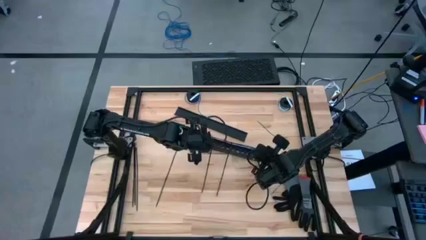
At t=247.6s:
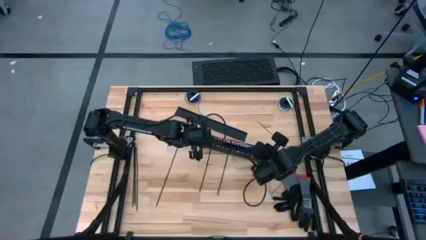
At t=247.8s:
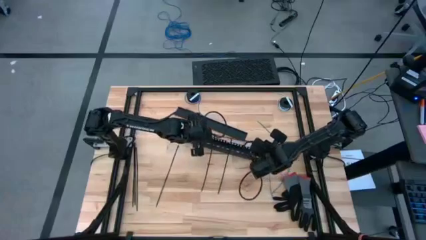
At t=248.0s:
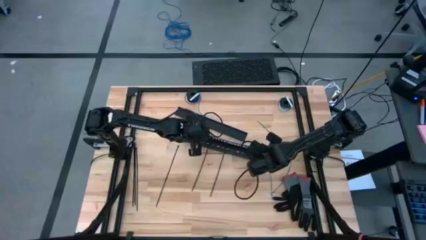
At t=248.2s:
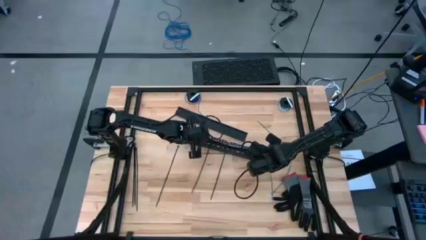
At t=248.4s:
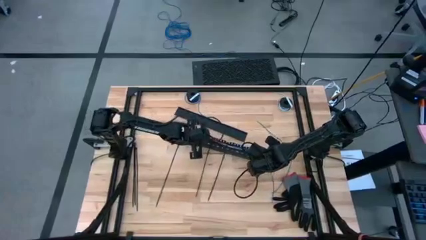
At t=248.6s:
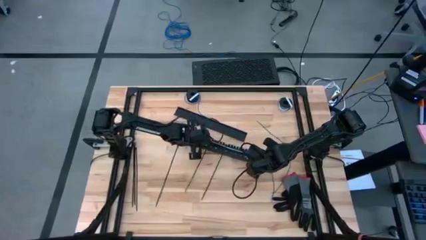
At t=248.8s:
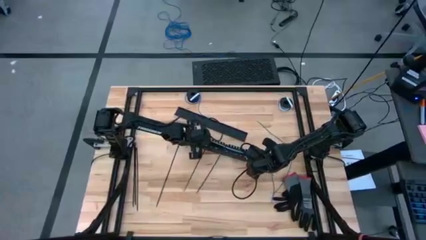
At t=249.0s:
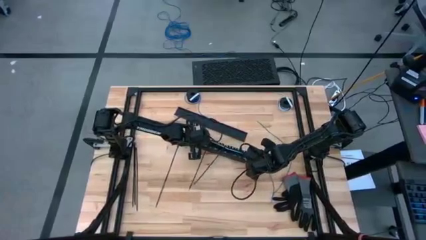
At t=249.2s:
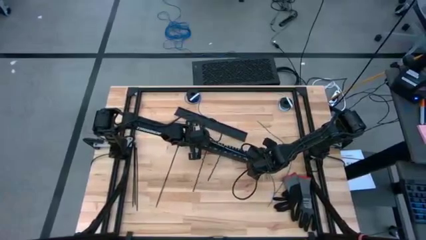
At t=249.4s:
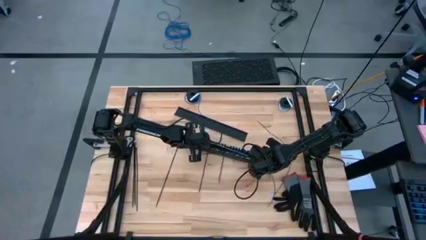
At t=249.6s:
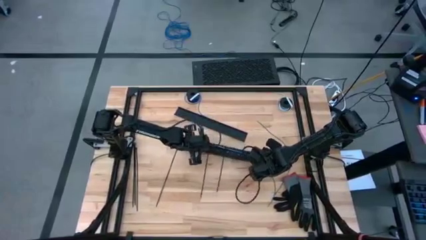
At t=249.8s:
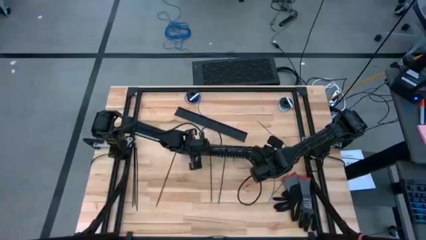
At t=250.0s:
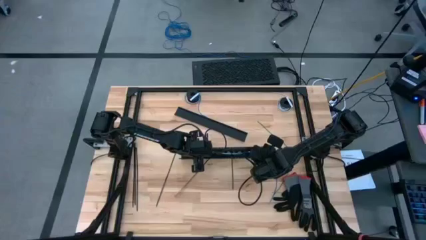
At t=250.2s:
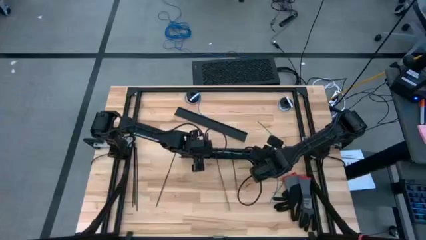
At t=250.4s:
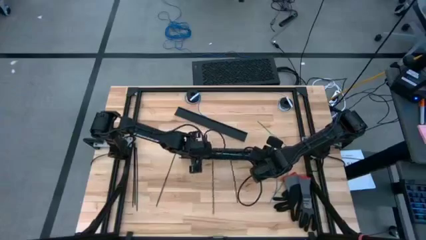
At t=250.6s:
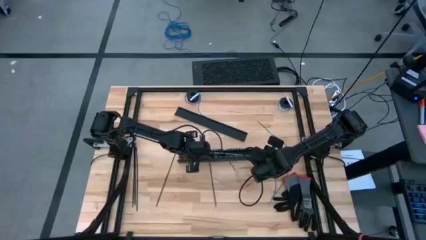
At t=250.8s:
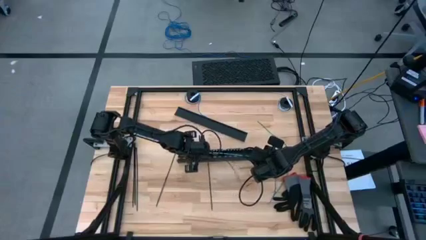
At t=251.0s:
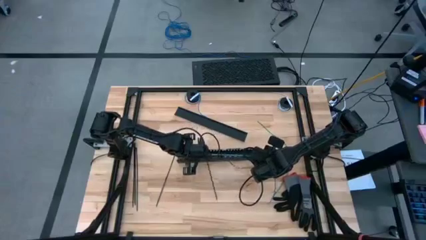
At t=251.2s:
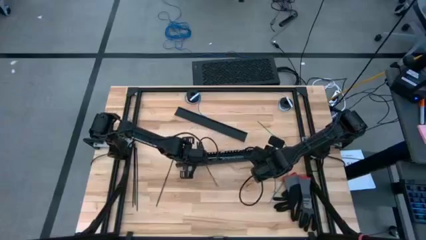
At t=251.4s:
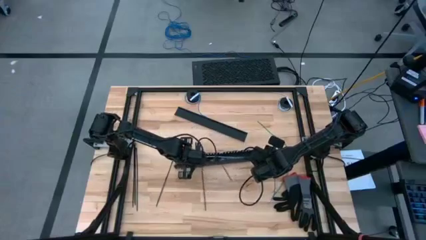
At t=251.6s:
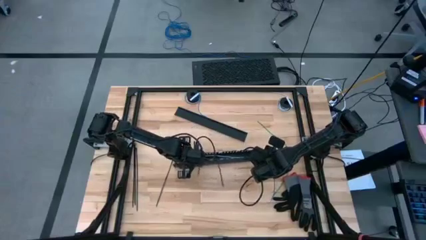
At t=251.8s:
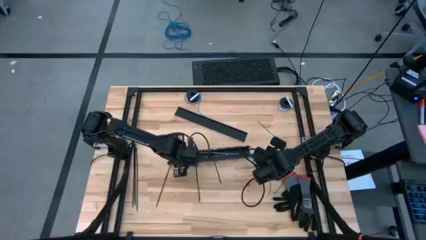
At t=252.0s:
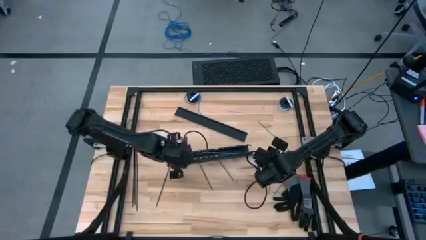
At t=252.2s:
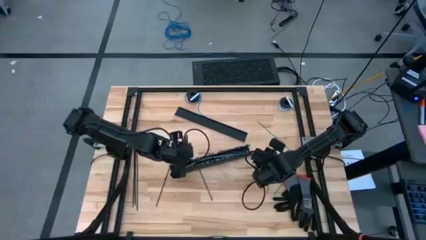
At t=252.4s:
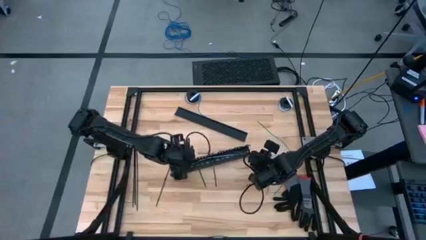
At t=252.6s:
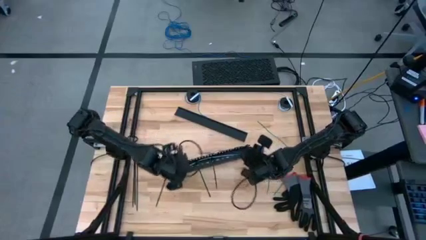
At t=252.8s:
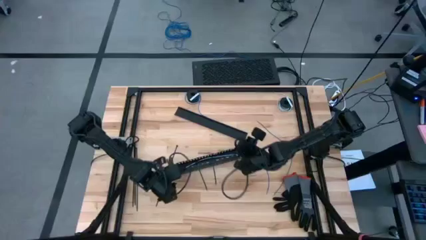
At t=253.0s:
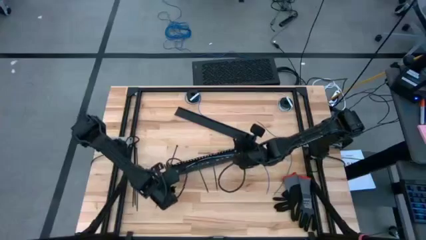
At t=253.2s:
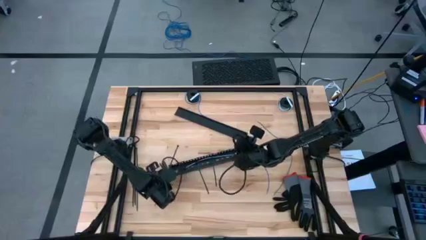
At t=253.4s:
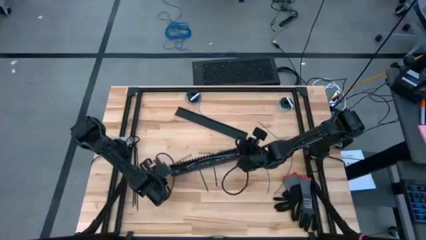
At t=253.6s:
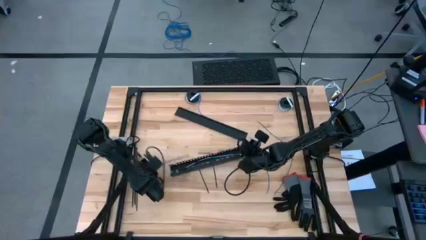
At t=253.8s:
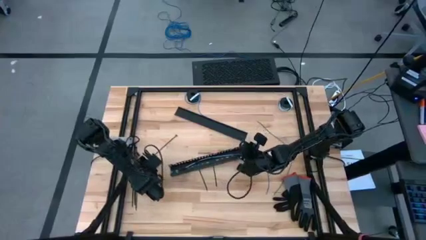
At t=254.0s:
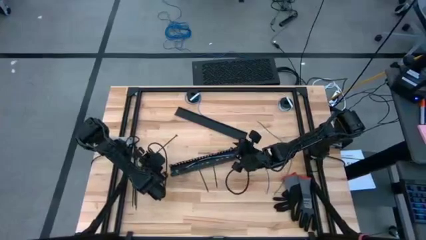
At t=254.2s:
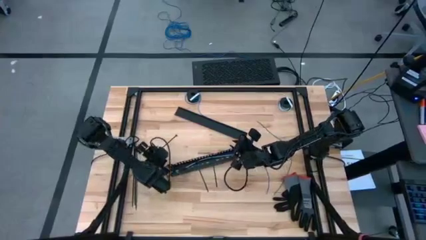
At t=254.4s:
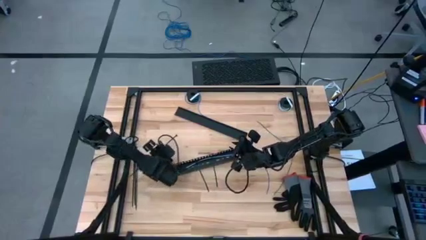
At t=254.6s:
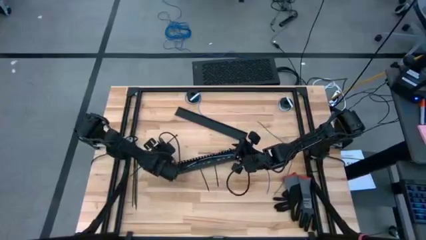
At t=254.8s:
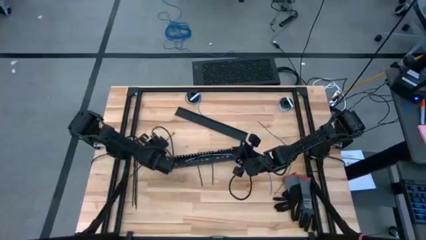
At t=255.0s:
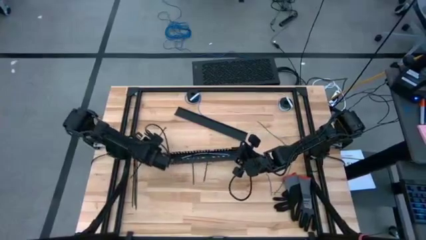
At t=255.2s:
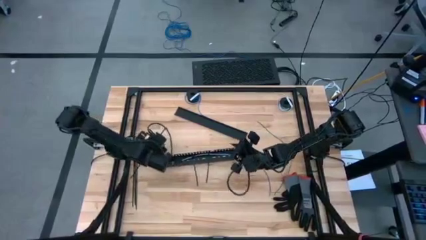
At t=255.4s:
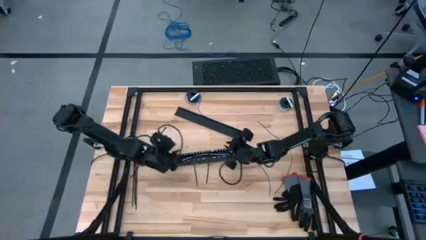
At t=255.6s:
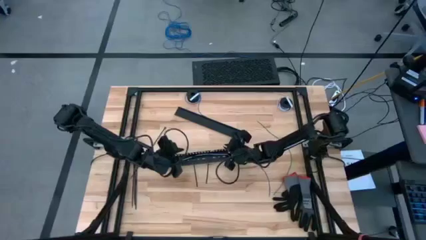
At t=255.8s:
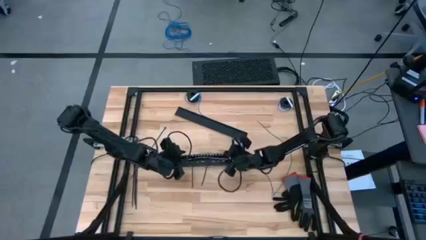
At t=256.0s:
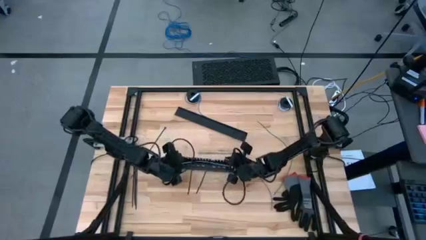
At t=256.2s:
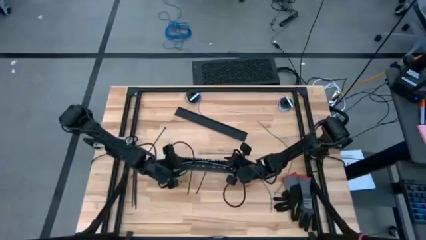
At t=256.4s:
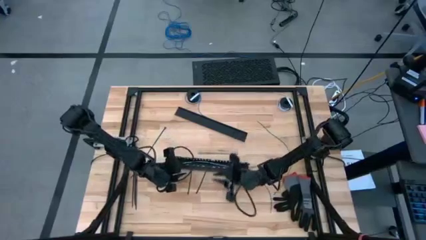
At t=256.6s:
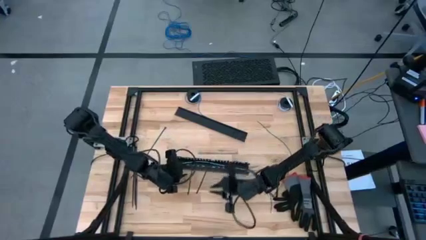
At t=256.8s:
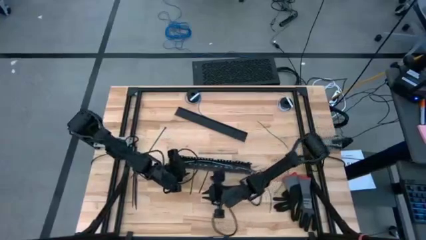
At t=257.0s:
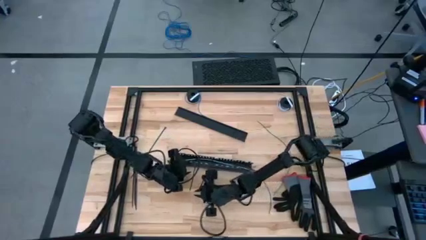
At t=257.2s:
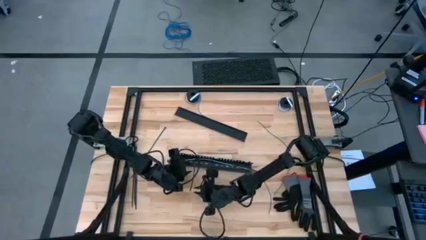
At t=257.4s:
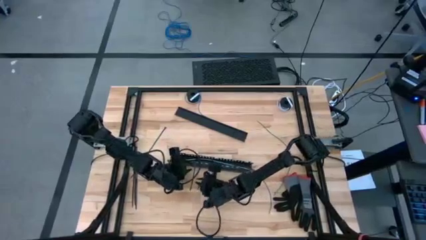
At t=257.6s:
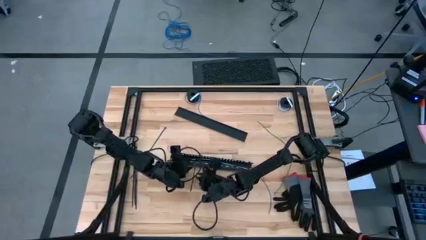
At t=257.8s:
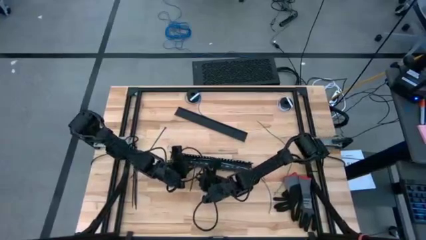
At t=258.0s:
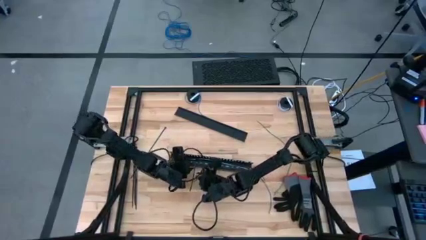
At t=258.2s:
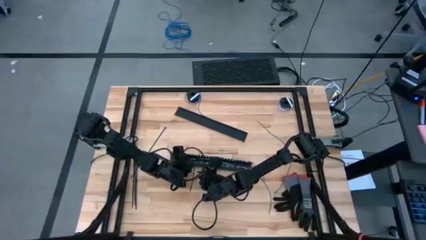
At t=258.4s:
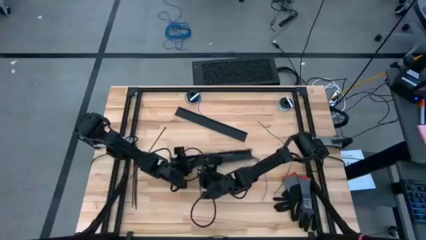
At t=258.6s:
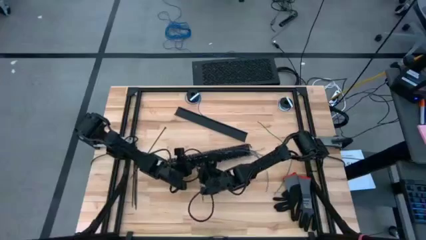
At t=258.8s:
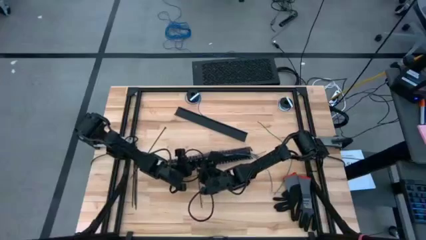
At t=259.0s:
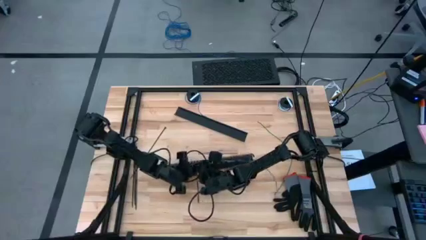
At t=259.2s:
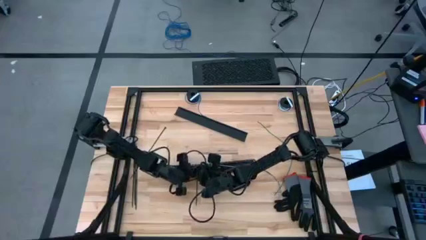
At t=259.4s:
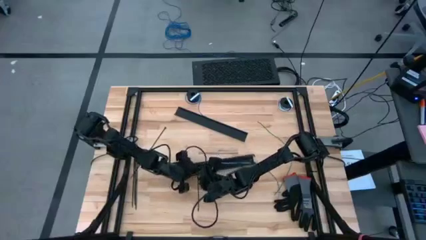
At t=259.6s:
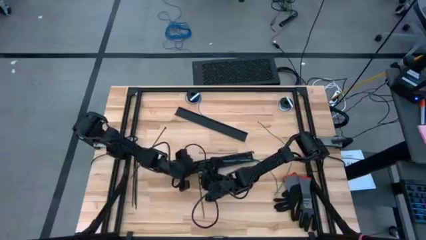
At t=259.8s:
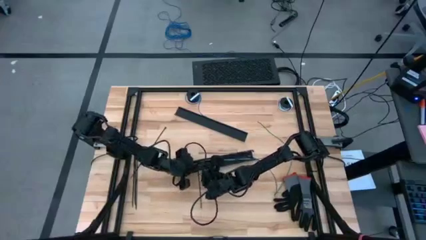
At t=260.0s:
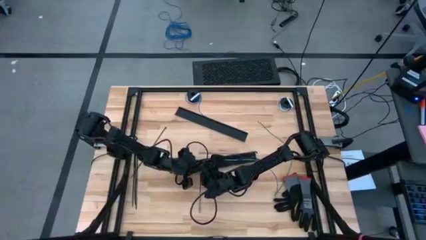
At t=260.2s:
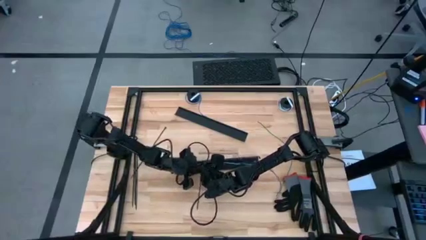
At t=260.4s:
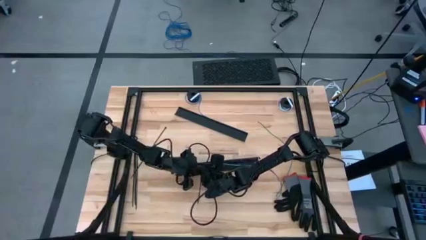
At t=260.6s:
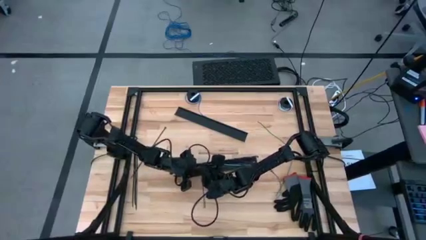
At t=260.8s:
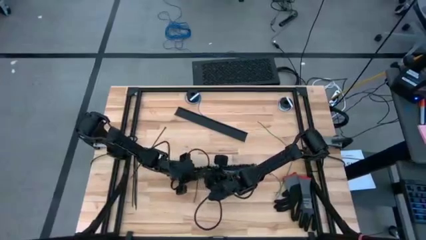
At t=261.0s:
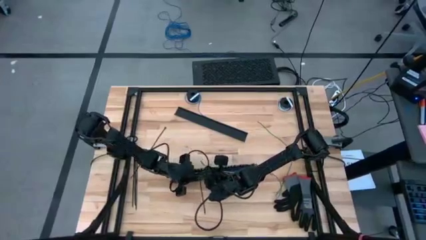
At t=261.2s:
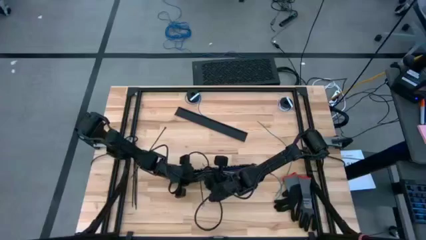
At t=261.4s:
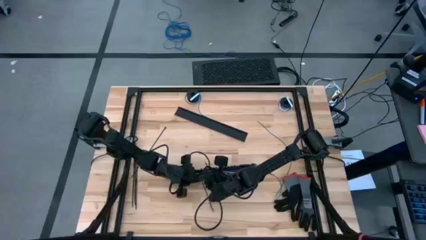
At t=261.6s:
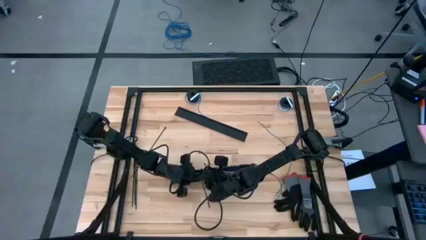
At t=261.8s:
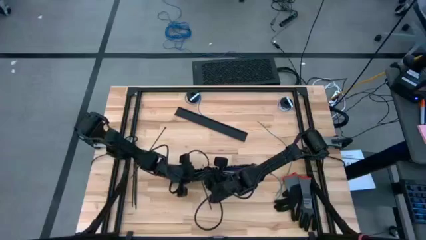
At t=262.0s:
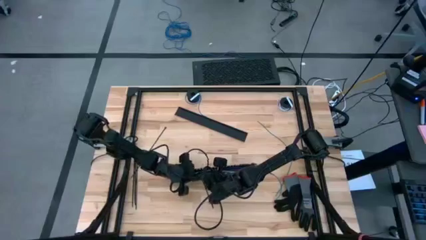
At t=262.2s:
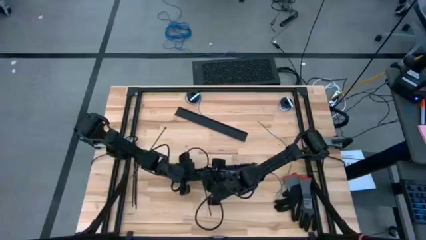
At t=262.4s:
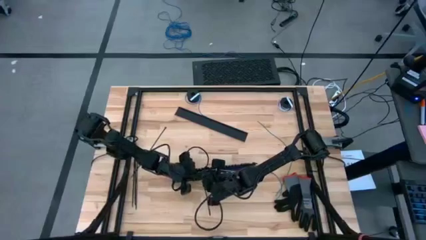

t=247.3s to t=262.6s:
Task: Ziptie cables
Put the zip tied cable wire into the black cable duct
